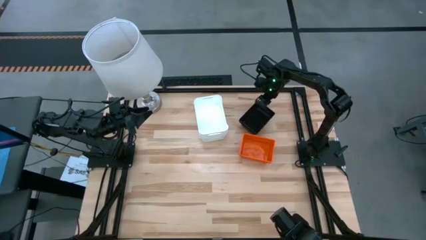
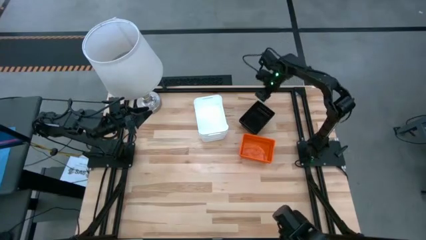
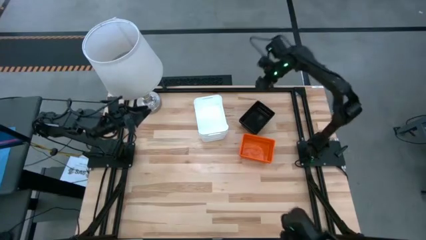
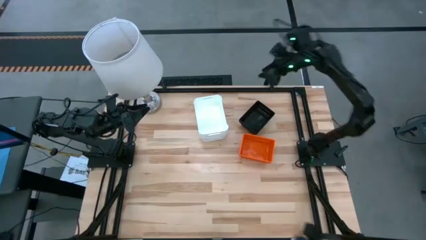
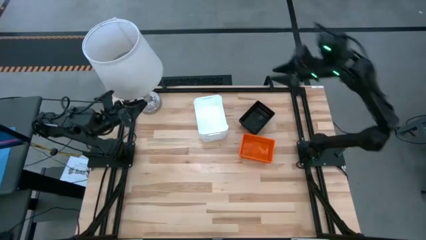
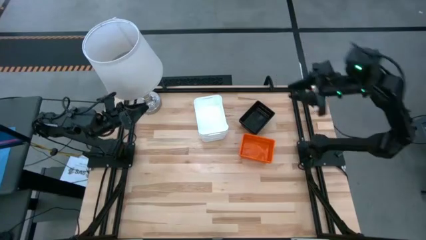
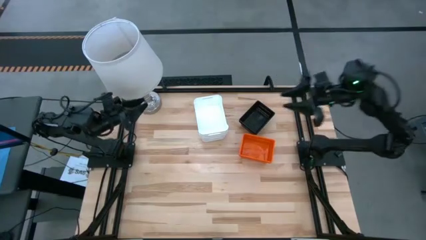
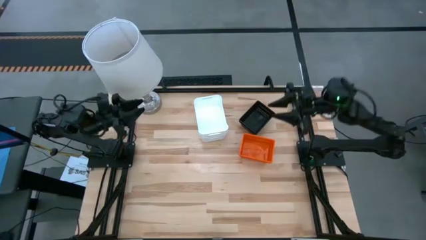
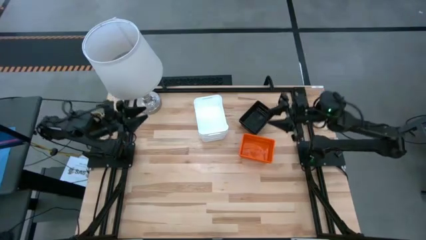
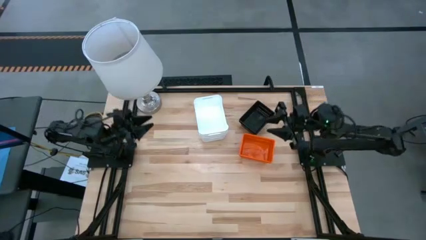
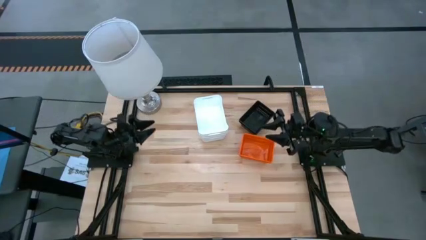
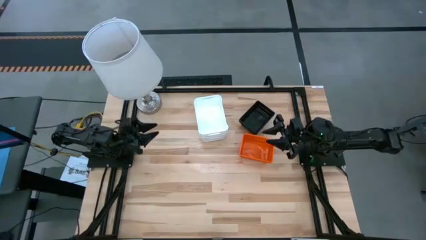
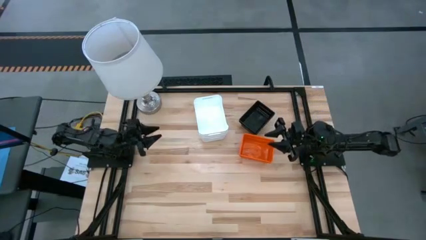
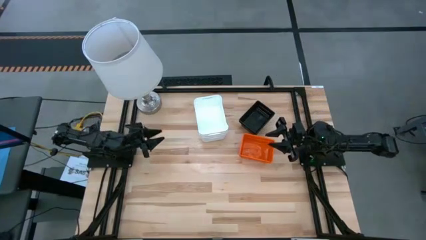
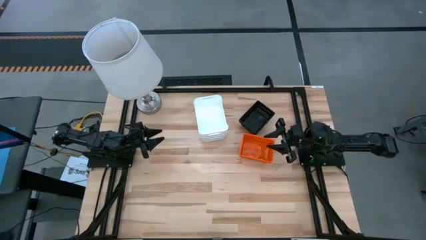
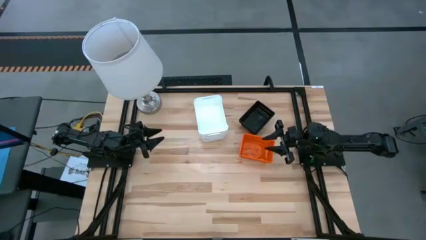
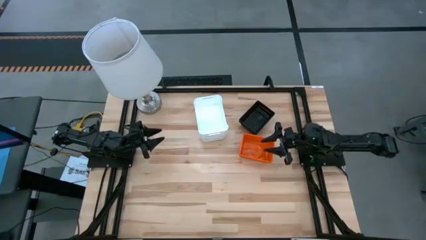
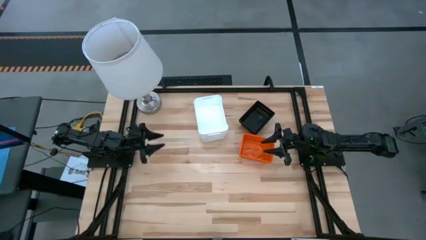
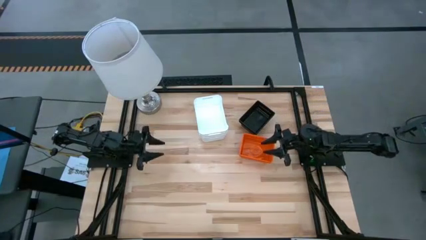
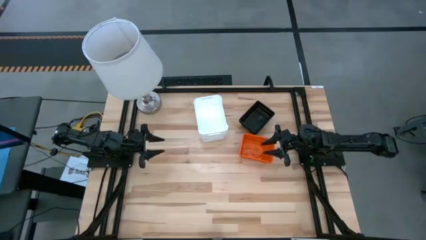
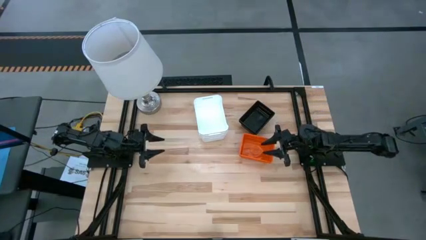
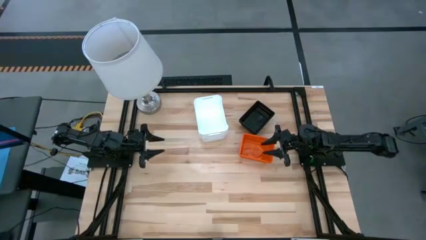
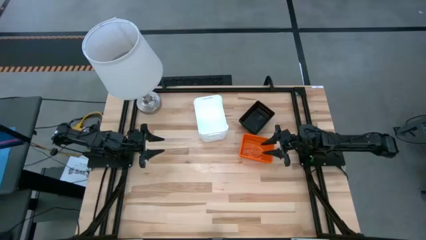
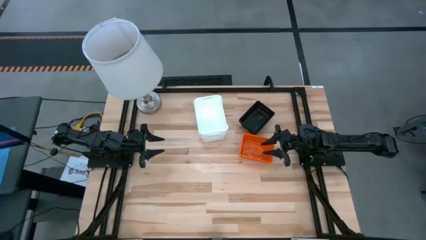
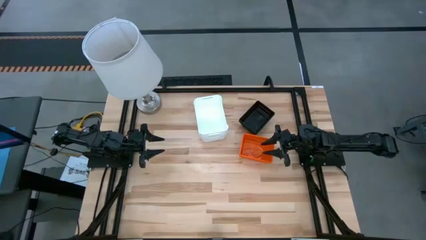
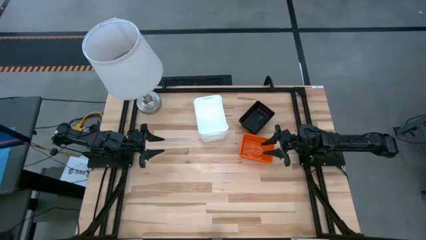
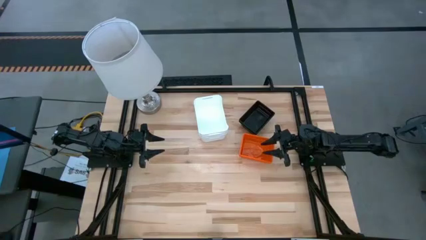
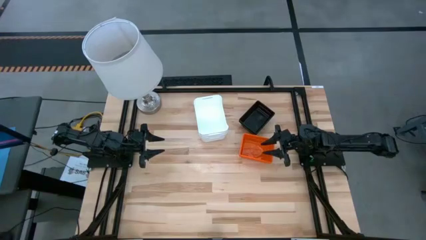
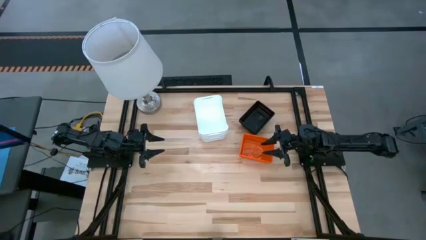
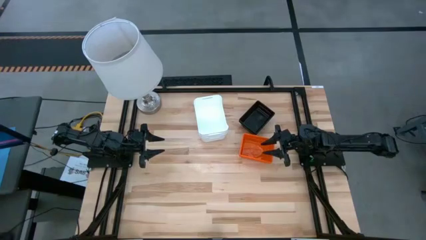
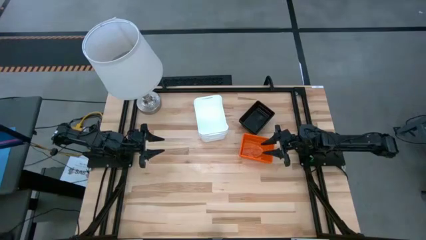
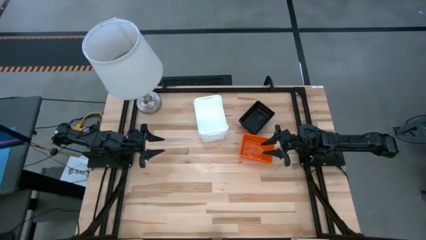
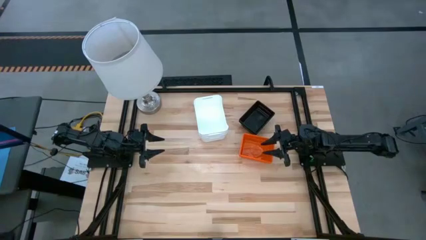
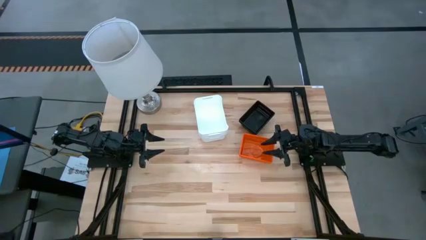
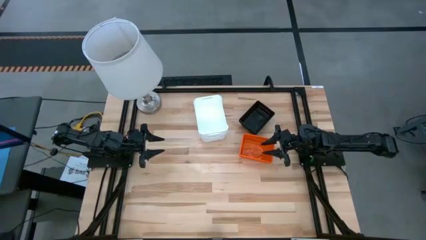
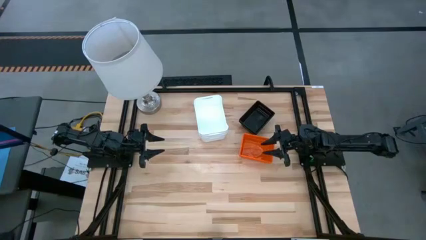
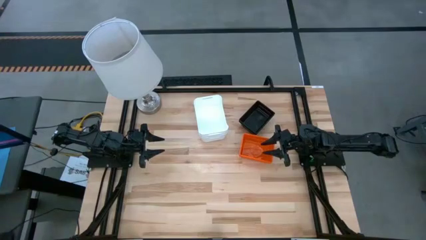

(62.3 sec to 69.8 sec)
Return to Home Position

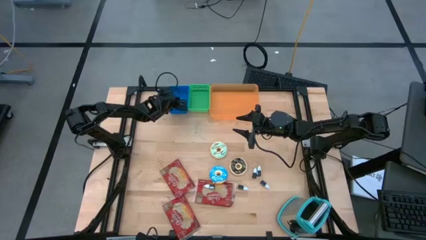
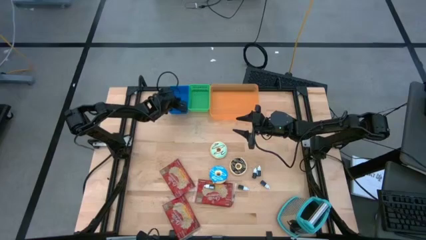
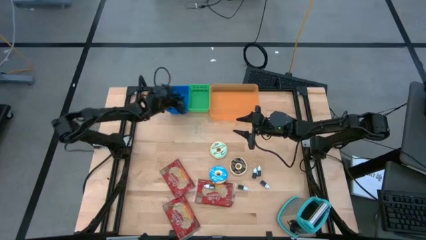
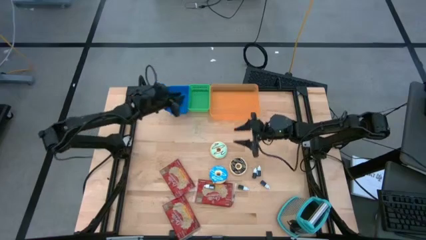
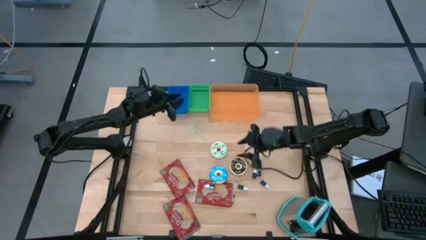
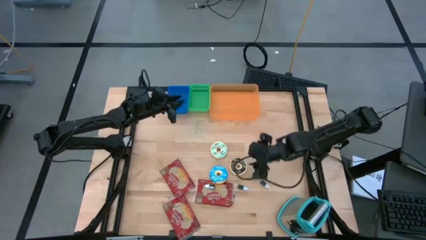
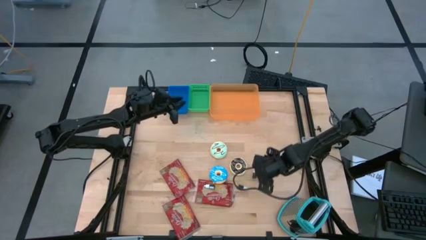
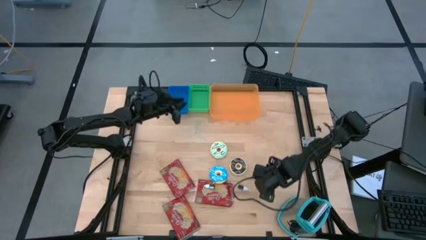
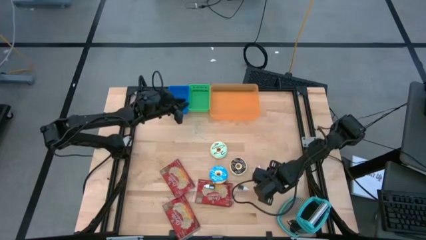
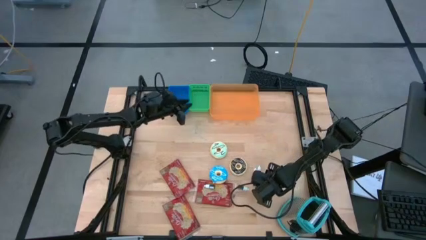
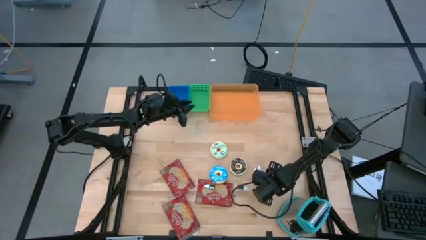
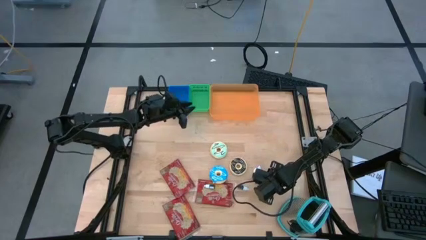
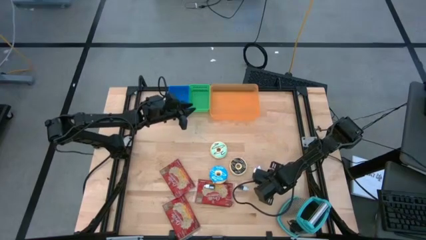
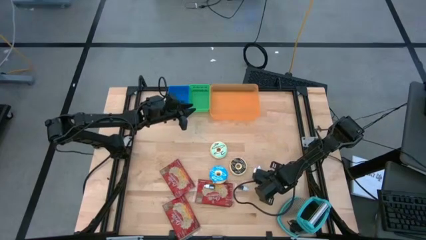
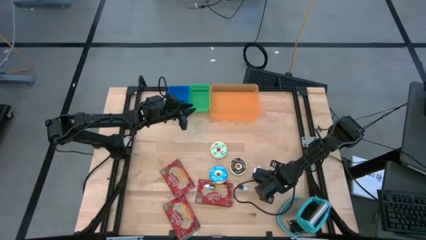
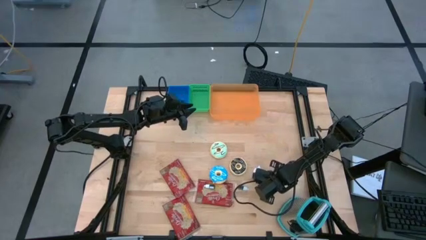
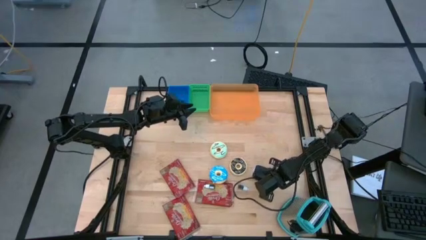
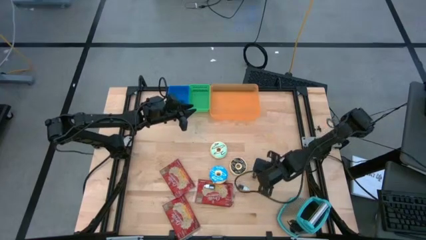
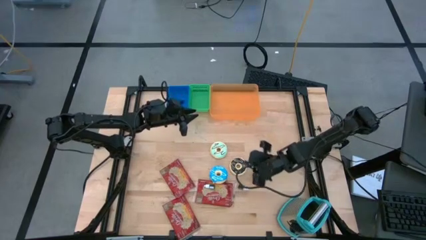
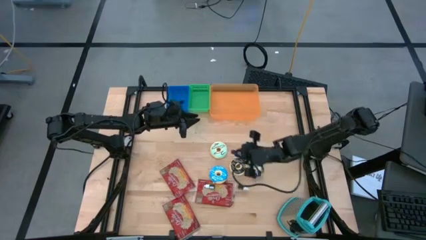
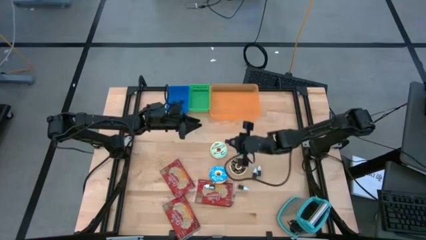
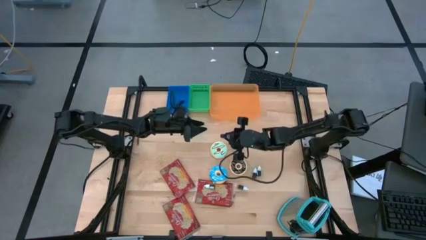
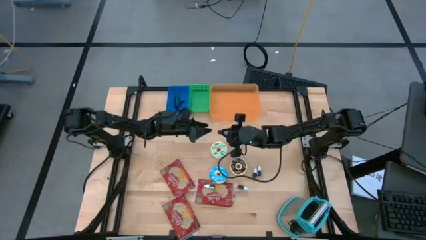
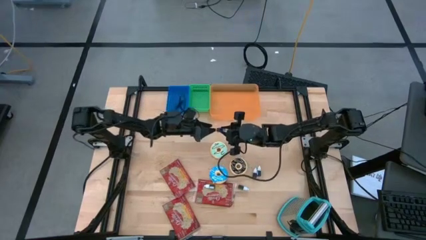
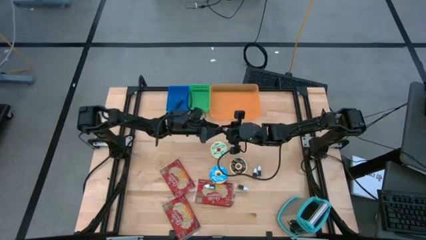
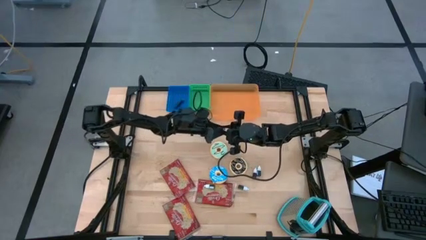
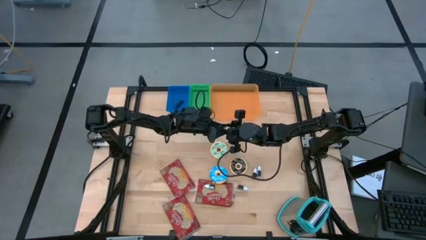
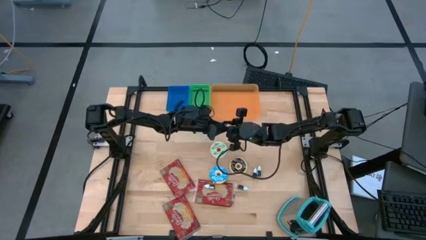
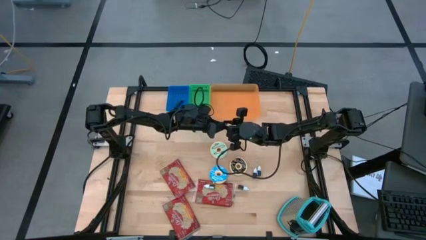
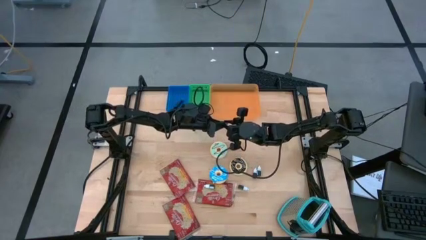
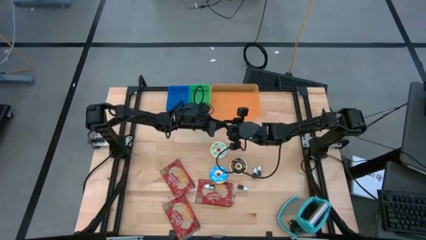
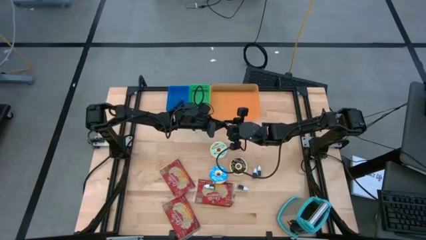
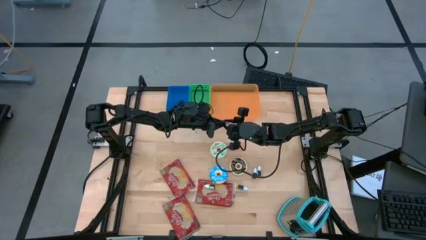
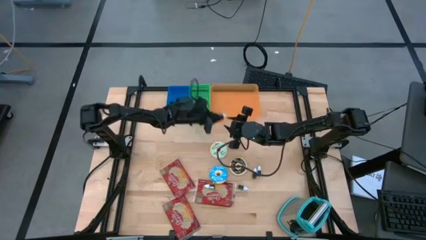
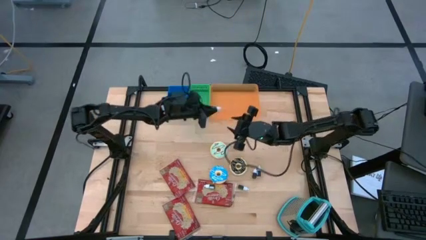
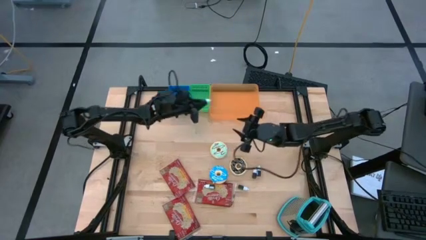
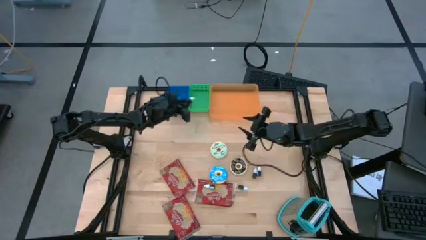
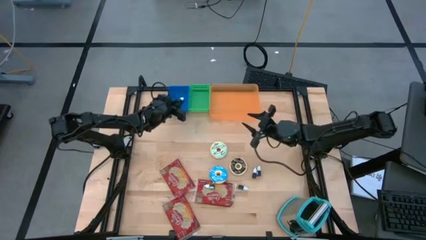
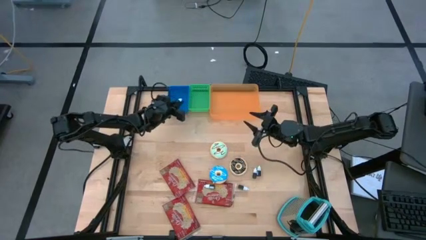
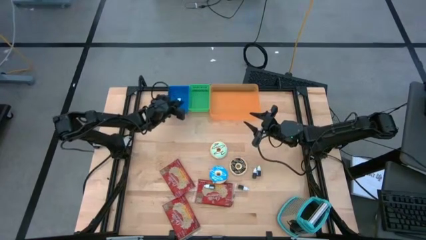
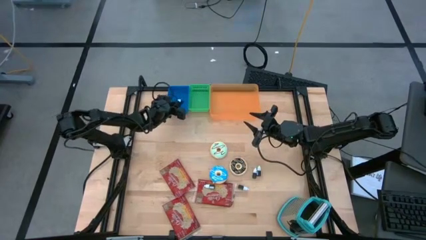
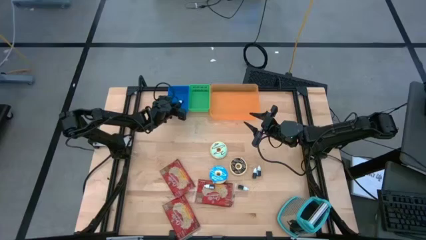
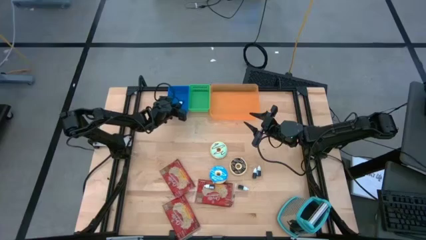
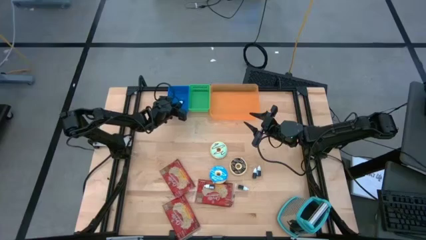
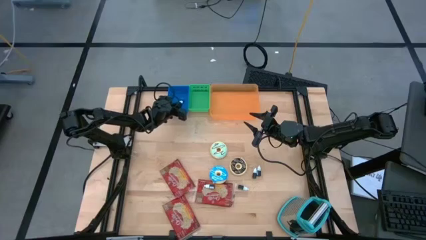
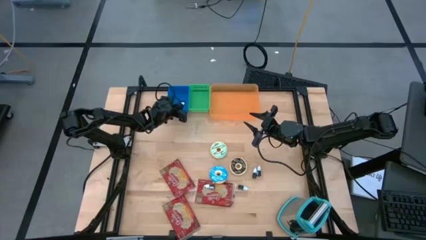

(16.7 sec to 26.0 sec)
Put the dark blue food coloring bottle into the blue bin
